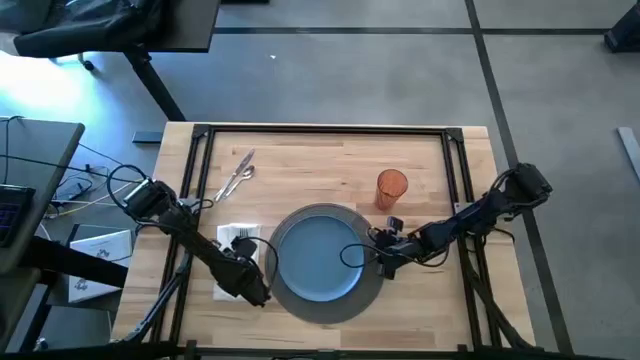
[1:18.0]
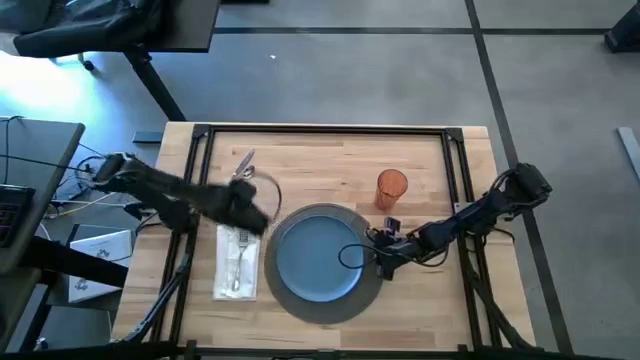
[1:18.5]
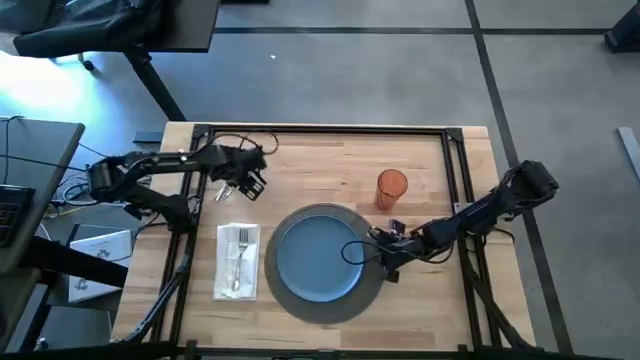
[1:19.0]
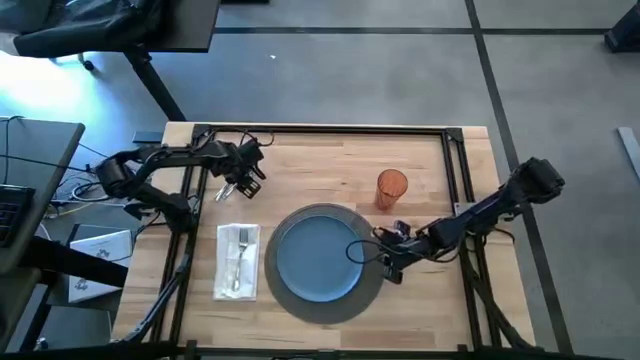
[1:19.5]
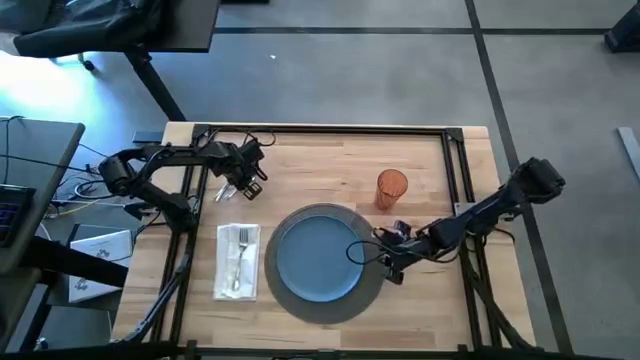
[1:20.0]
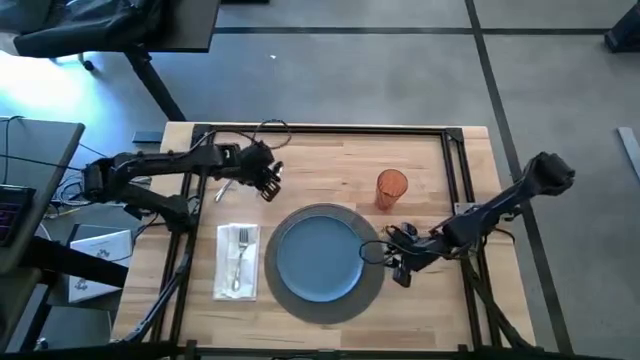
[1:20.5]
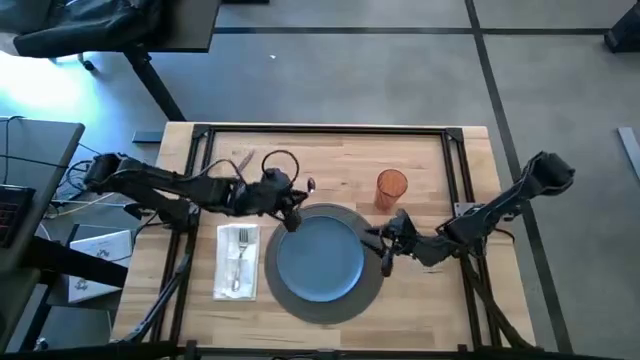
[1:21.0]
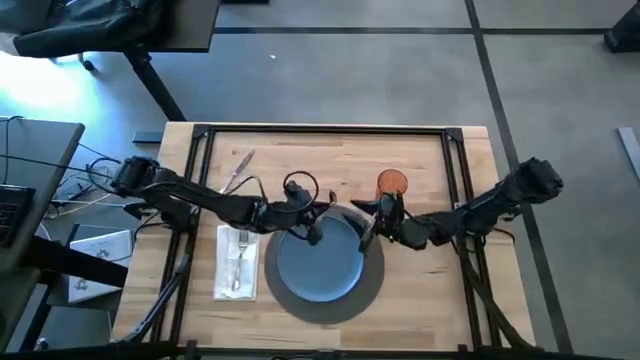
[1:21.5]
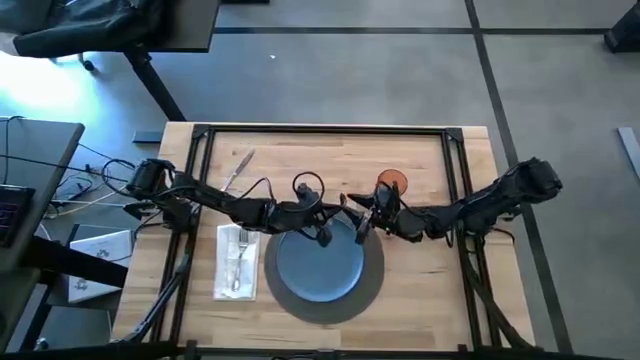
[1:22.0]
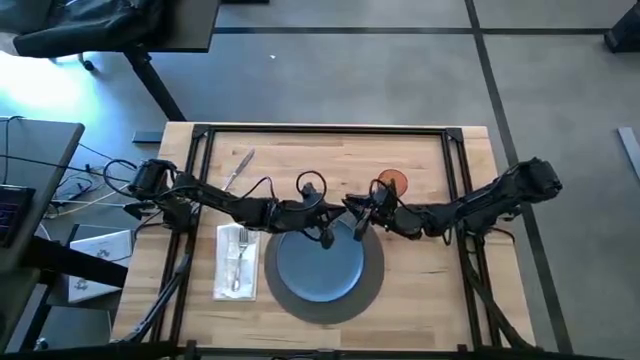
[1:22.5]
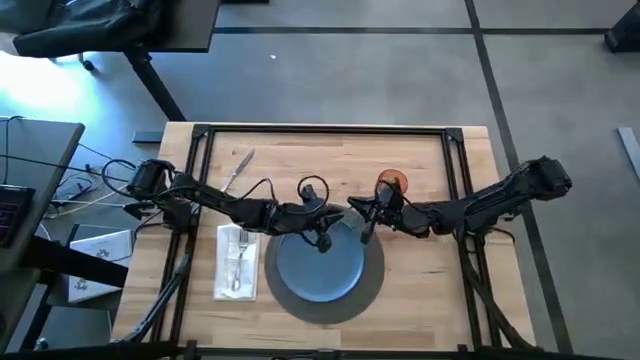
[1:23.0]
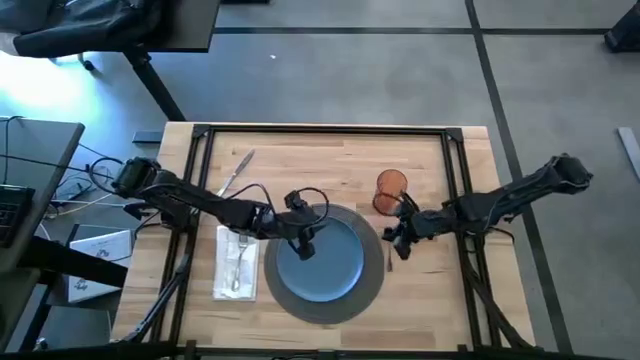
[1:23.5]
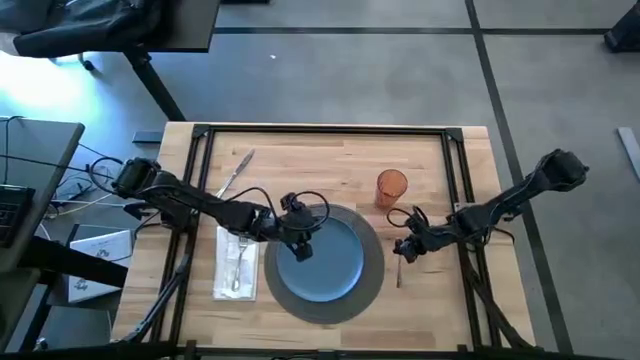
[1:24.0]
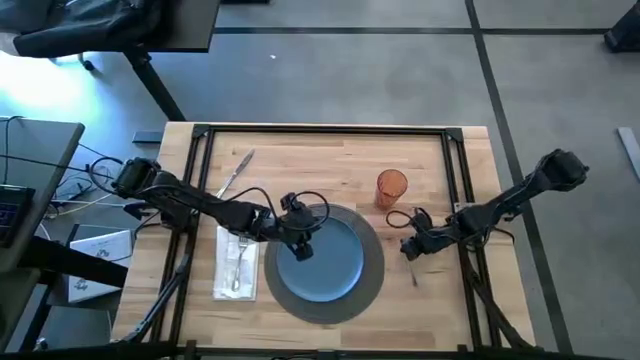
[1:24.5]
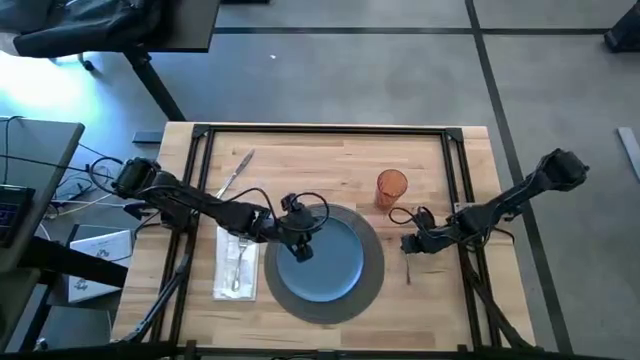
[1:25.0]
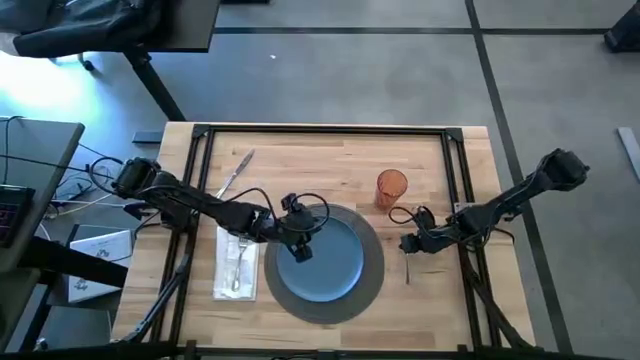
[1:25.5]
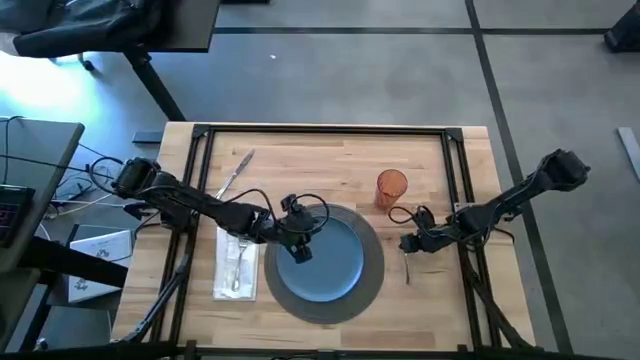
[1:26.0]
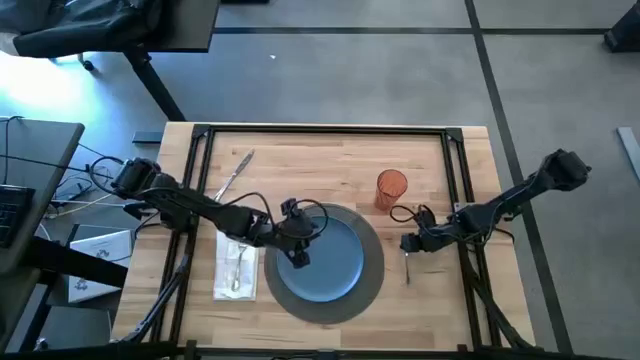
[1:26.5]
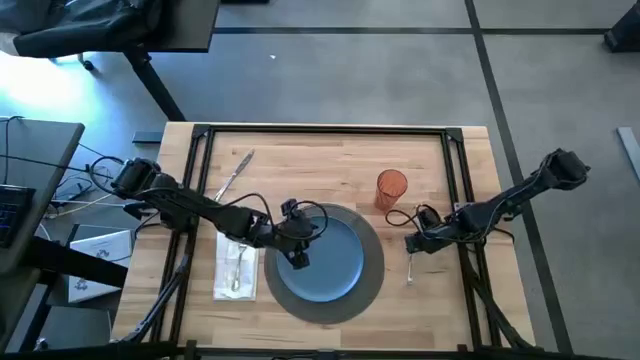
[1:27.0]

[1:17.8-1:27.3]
Task: Set table place
Put the silver spoon to the right of the gray table mat

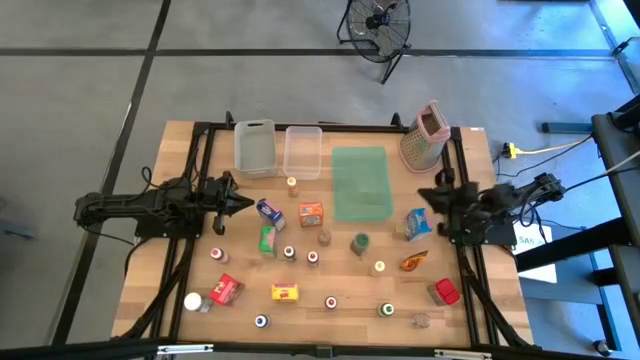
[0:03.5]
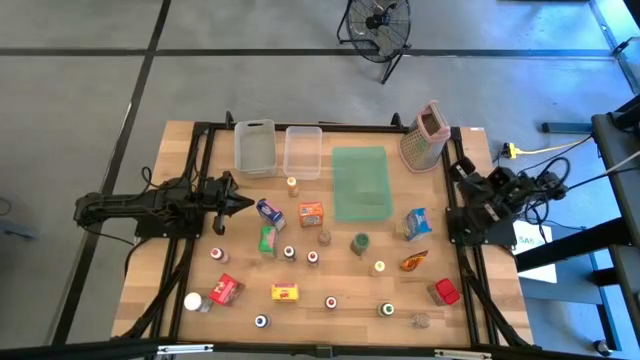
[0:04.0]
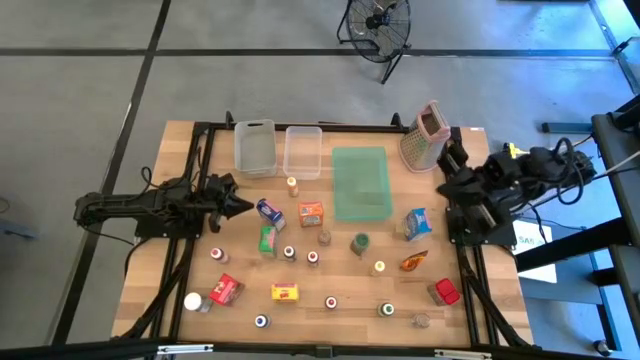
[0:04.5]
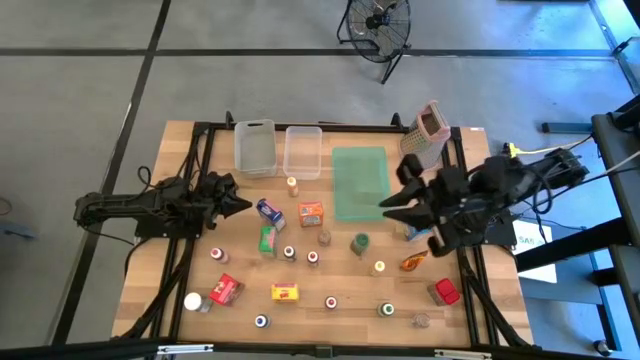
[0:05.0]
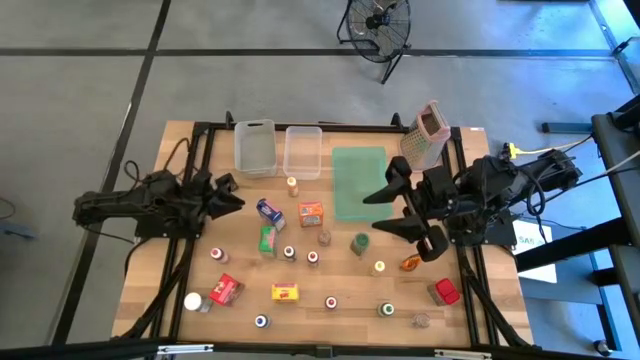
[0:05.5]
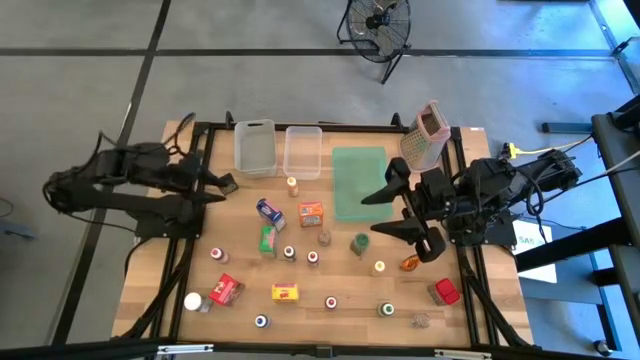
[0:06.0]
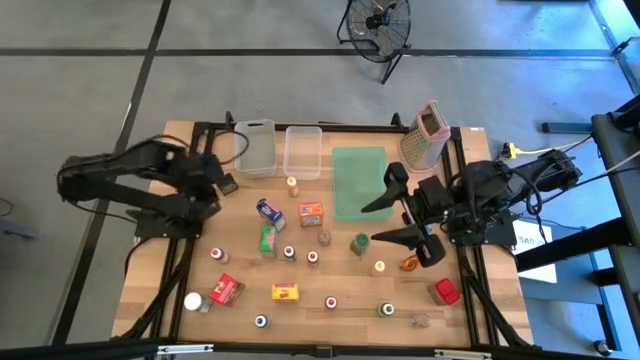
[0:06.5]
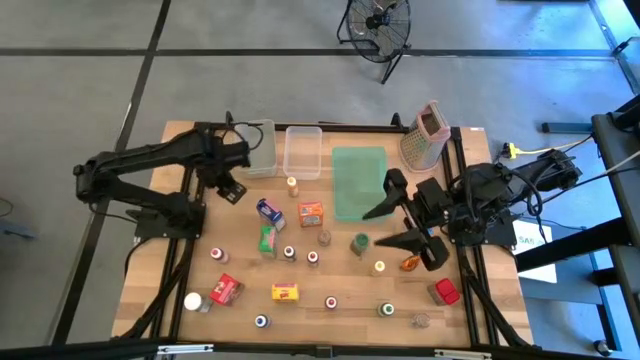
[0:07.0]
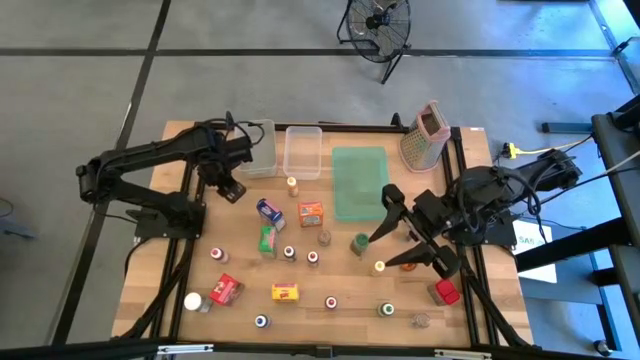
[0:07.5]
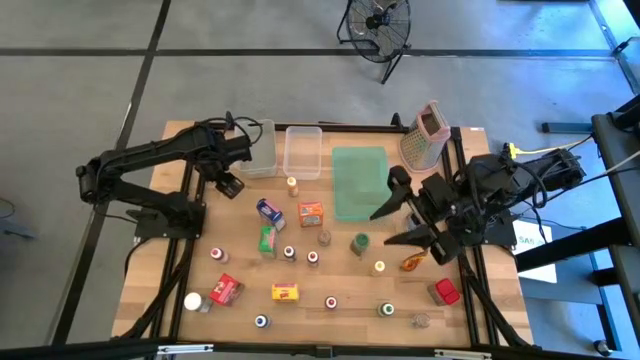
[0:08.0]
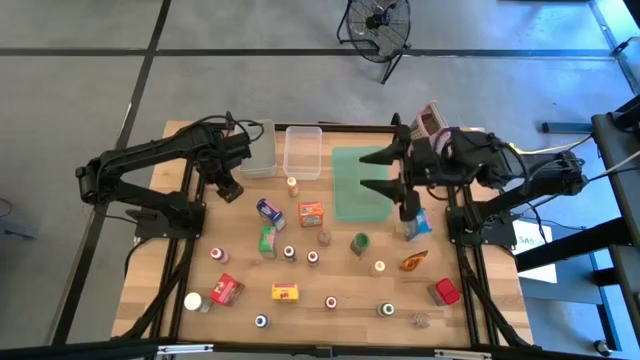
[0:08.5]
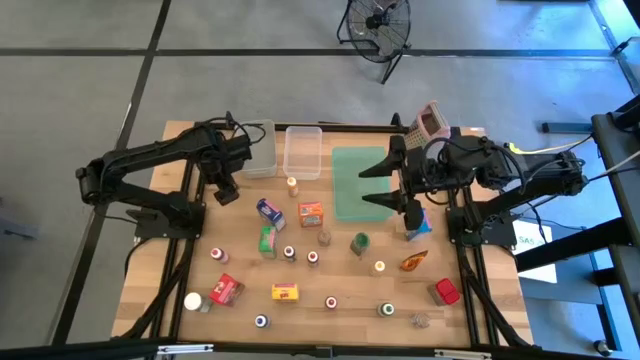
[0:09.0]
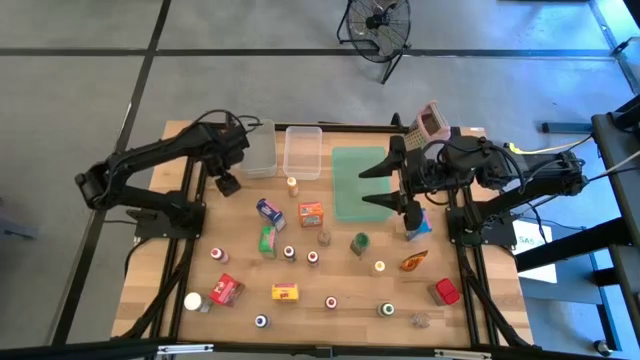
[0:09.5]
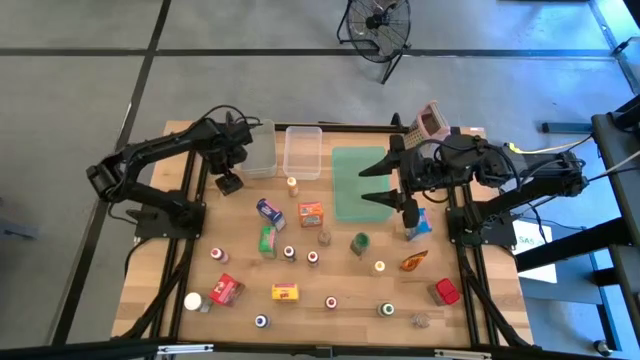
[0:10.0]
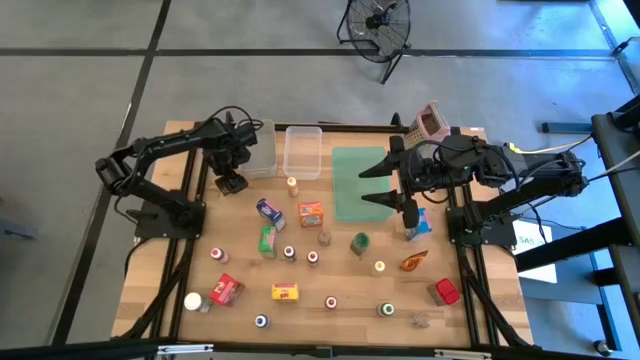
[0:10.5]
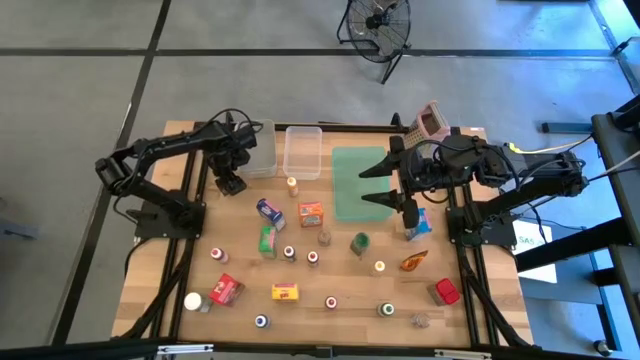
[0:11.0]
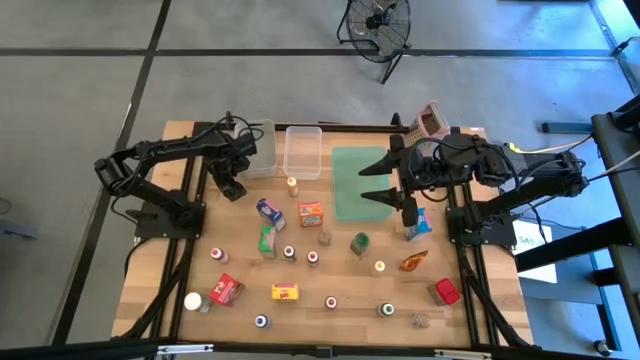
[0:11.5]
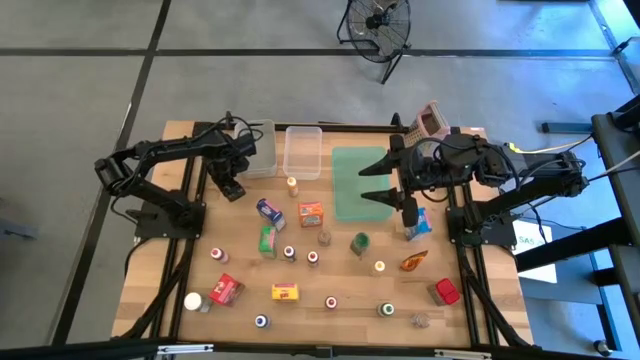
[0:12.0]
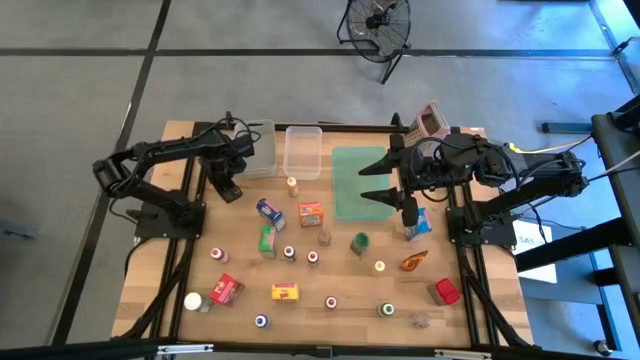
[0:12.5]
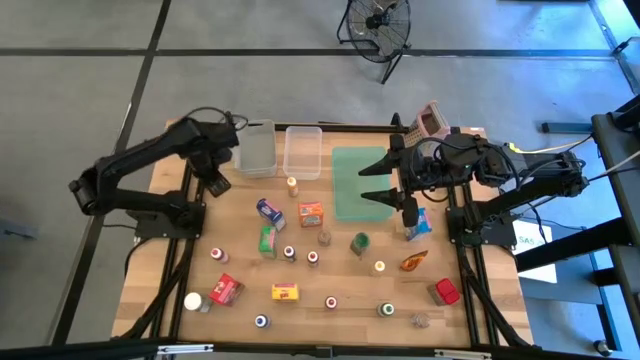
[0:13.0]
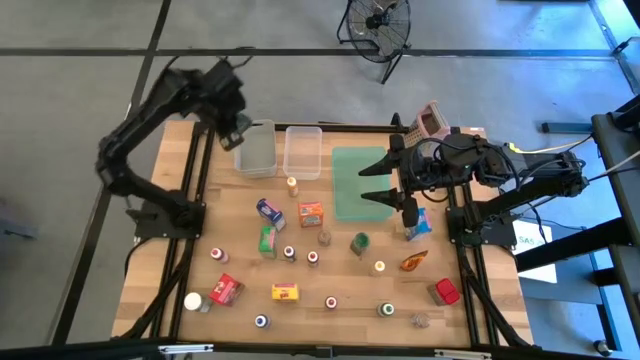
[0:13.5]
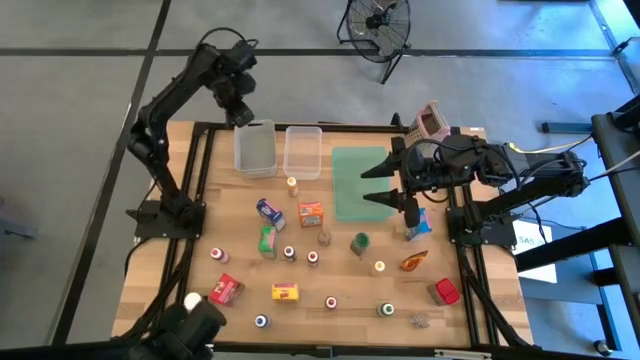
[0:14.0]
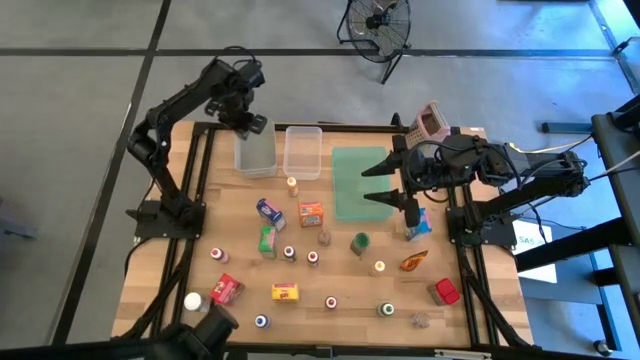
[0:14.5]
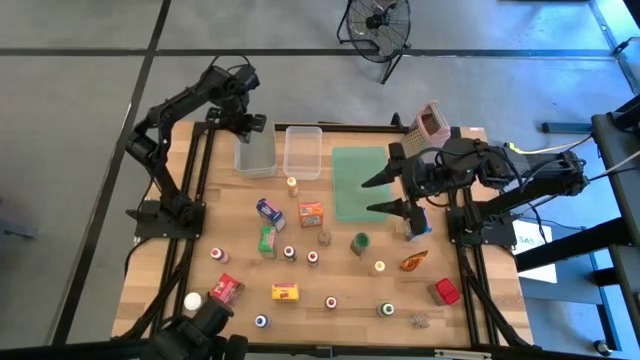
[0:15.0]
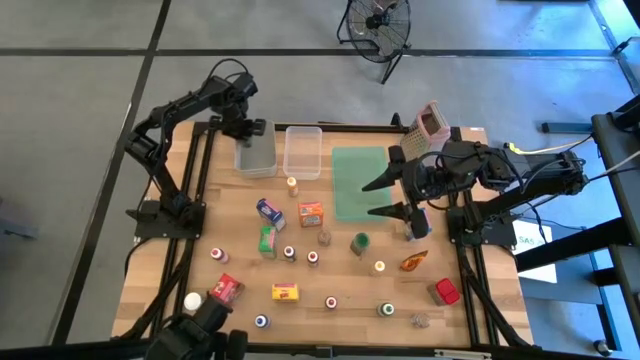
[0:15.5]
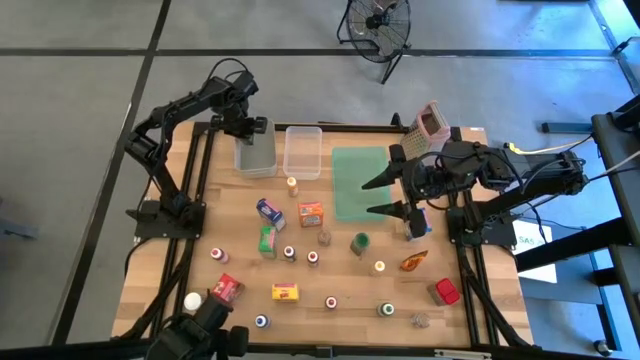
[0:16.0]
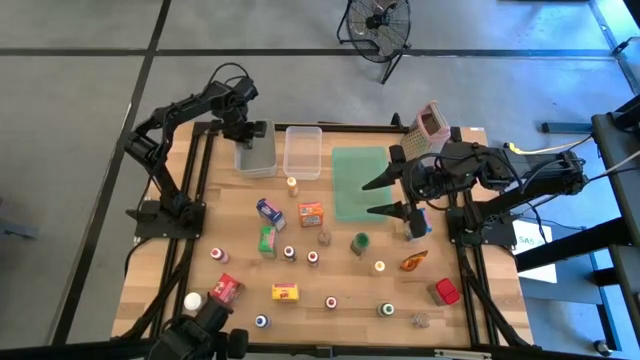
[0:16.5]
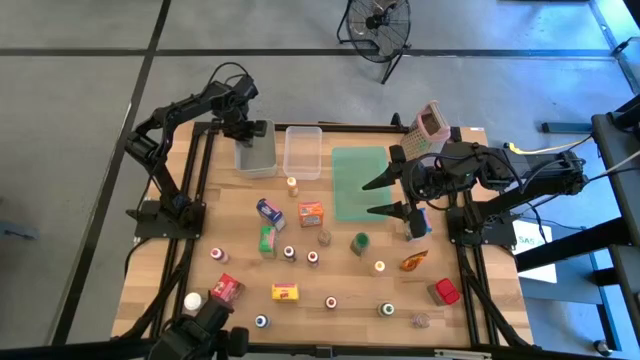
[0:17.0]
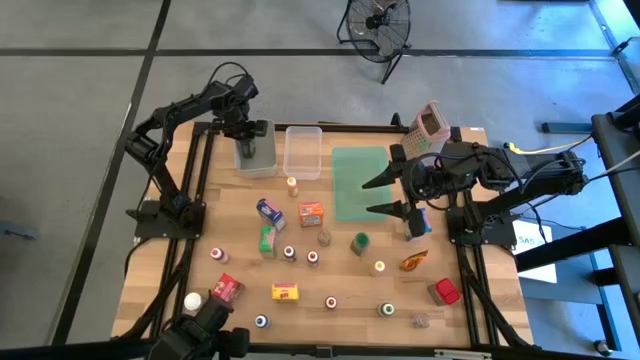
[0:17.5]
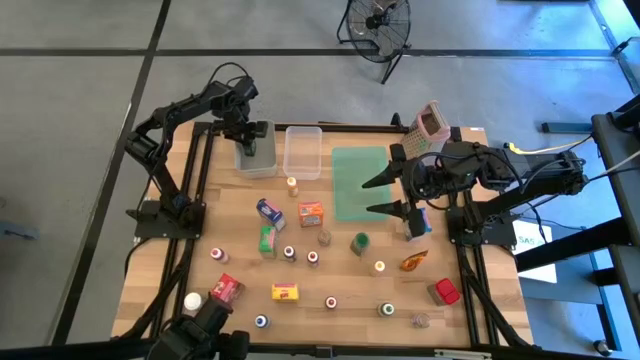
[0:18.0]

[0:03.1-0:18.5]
Task: Pick & Place Kitchen Items
Put the green spice can into the gray bin
